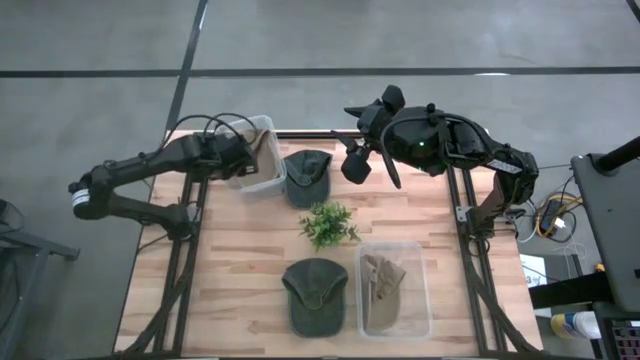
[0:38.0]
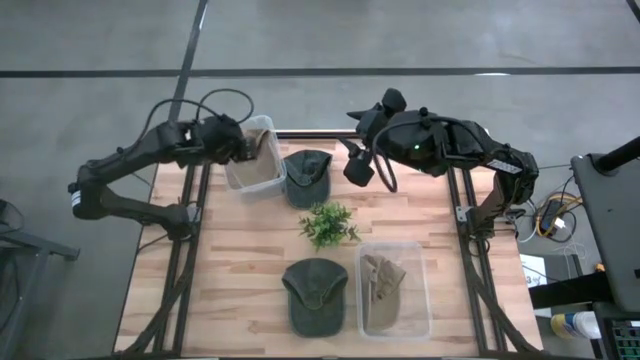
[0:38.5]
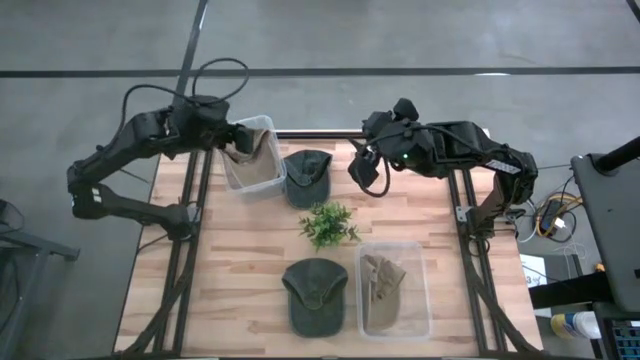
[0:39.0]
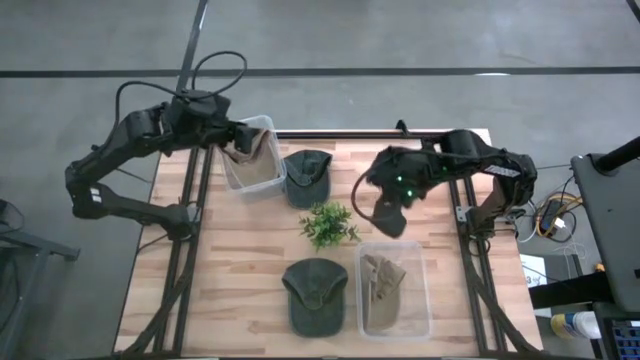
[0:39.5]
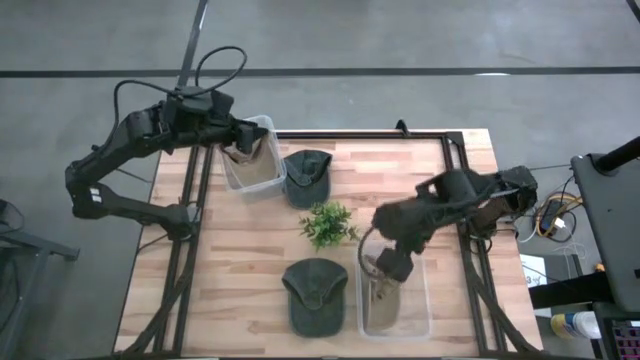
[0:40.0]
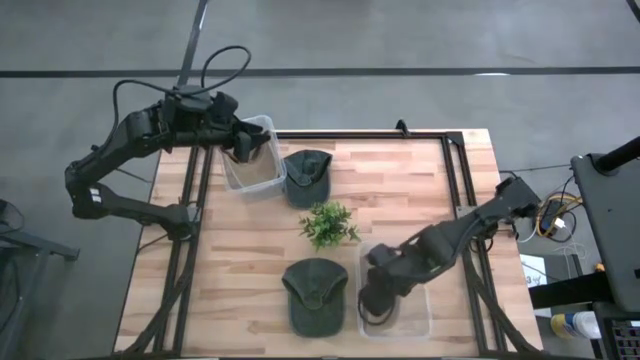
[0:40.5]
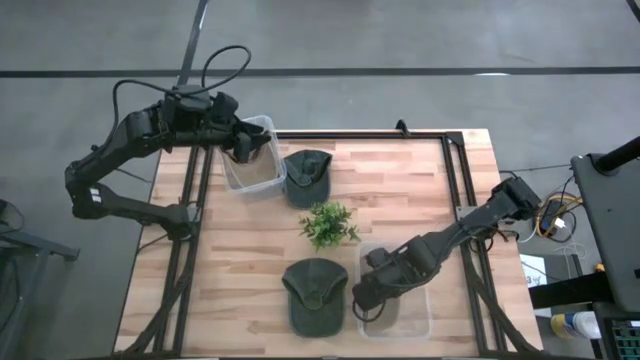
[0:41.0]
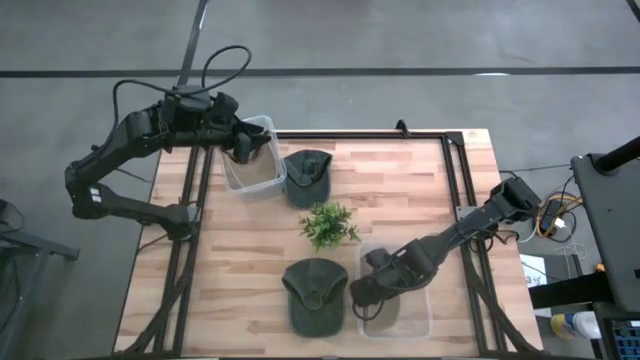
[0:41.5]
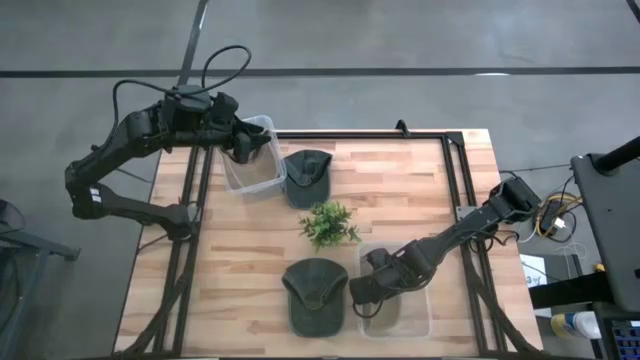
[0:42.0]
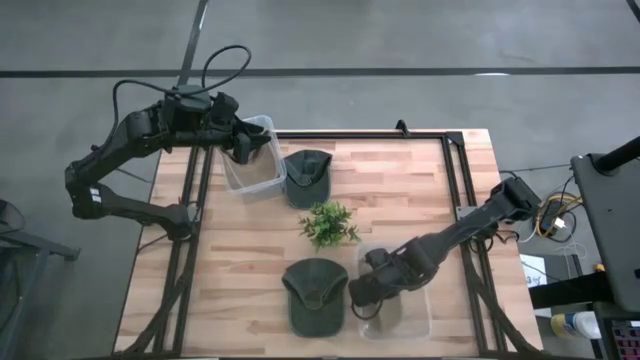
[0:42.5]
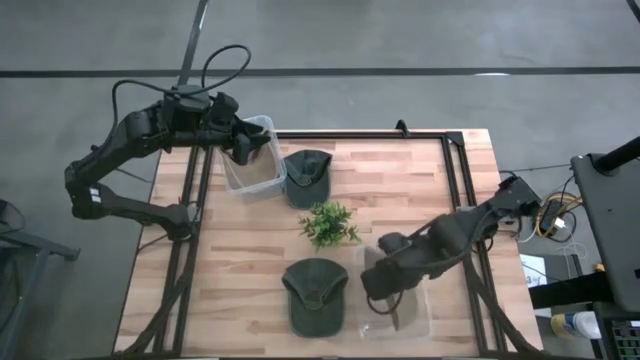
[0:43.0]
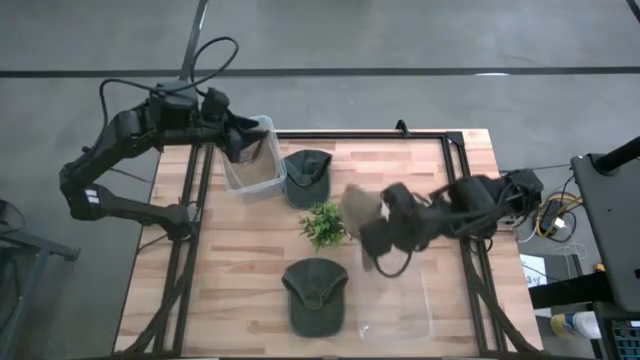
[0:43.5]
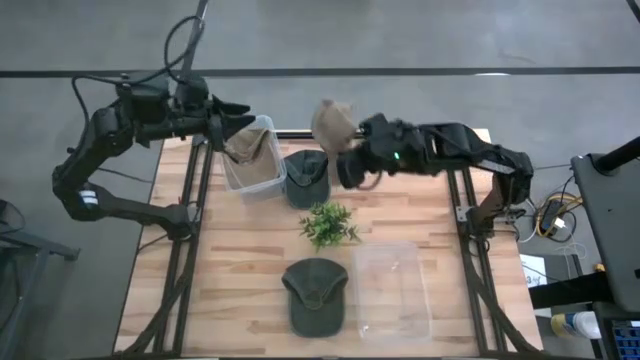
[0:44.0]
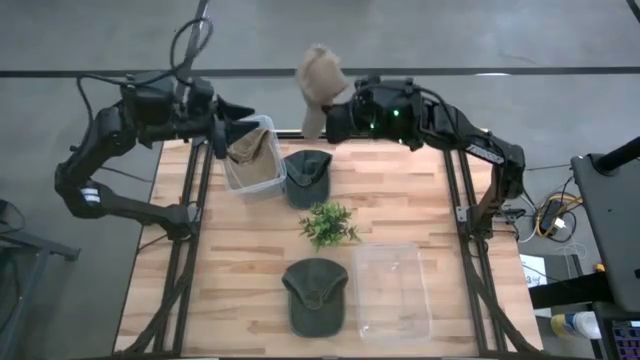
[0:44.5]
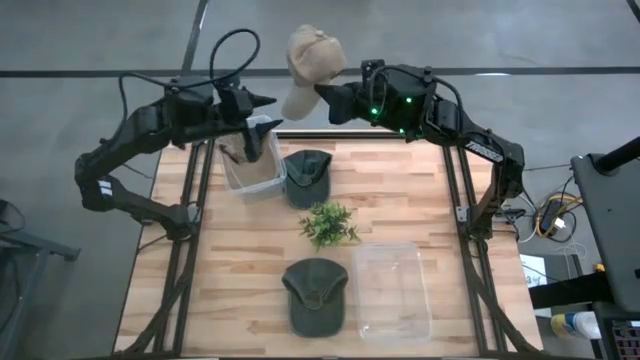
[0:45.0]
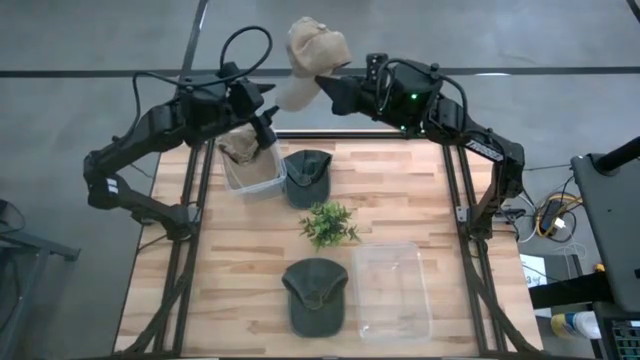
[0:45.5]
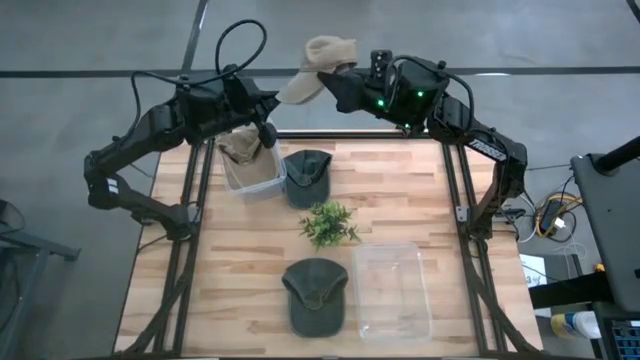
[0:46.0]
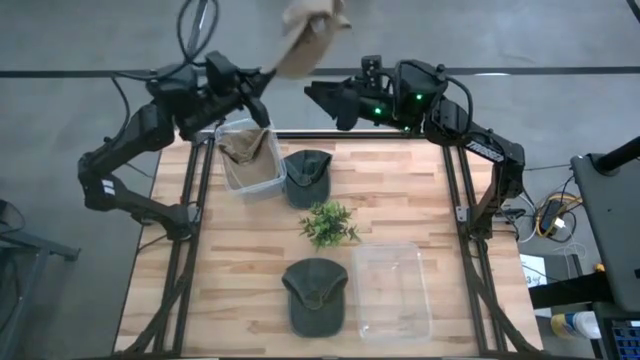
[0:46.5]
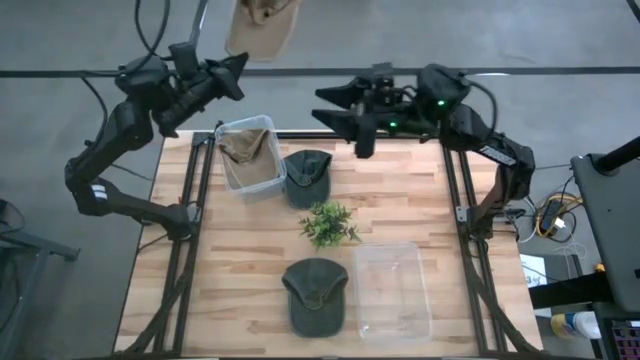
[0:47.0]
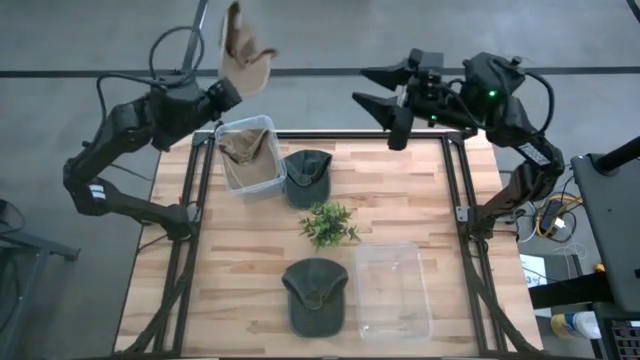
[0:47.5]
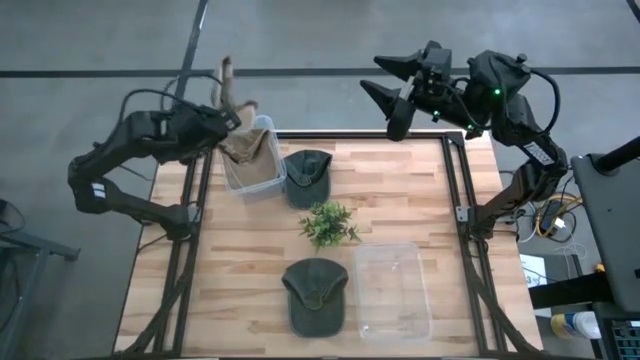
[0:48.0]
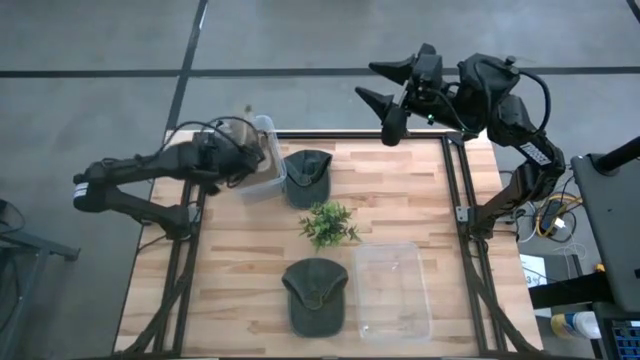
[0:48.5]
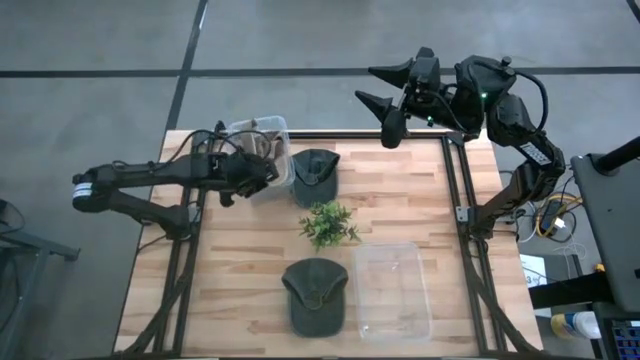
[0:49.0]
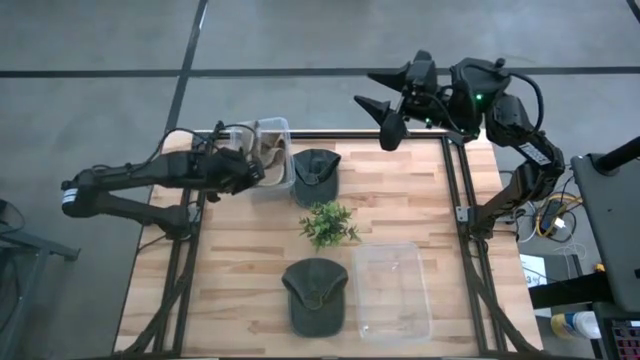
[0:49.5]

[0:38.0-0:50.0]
Task: Pick & Place hat
Put the brown cap from the bottom transparent bin into the top transparent bin

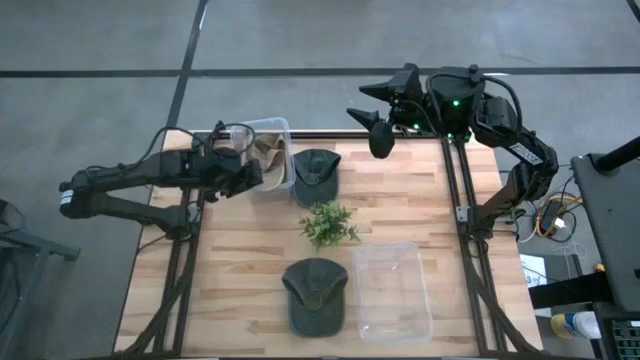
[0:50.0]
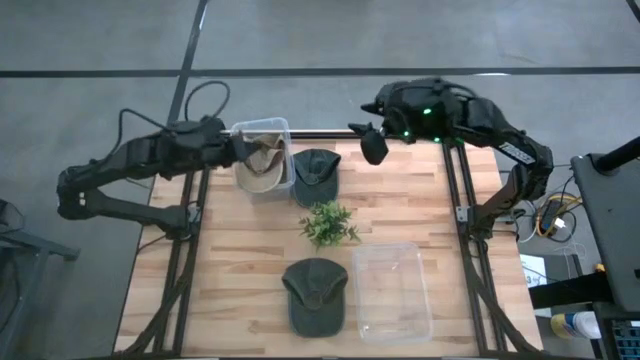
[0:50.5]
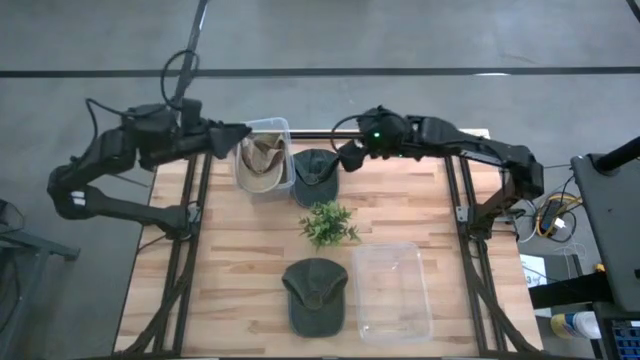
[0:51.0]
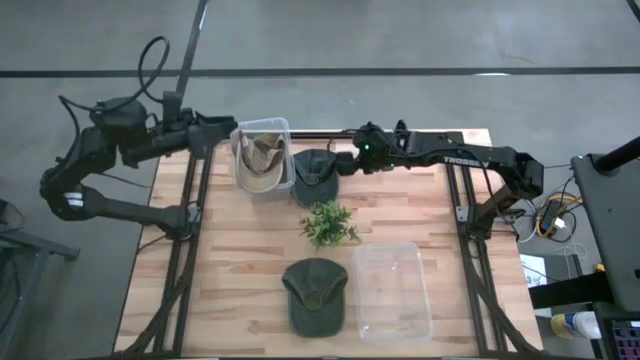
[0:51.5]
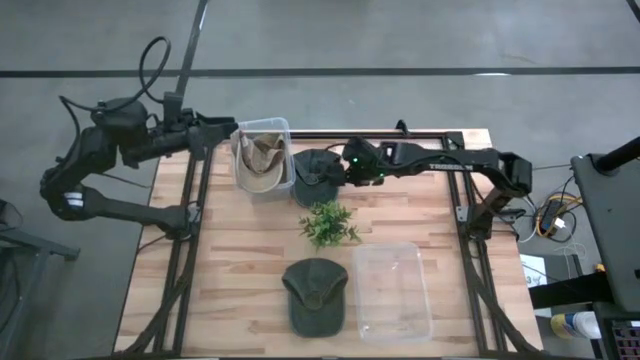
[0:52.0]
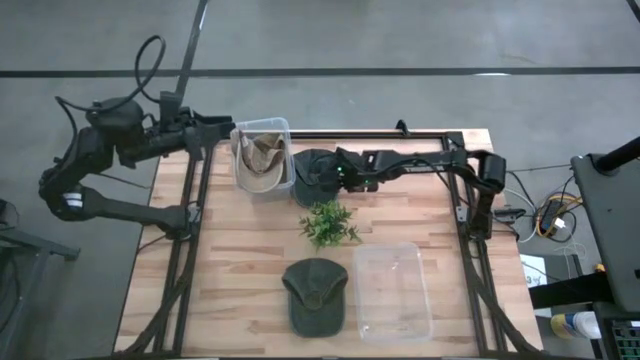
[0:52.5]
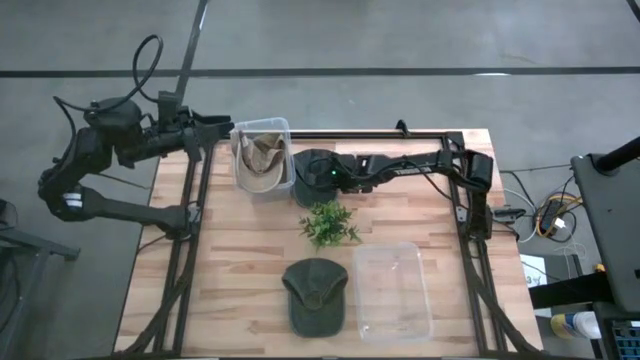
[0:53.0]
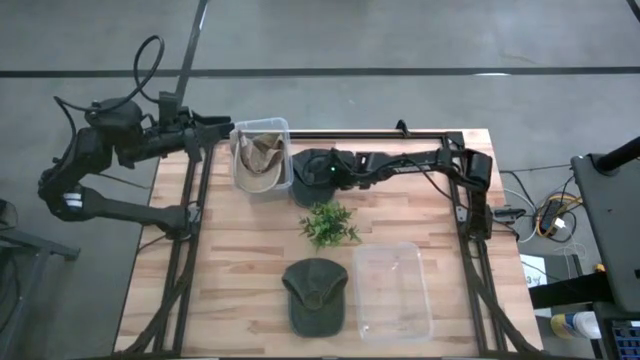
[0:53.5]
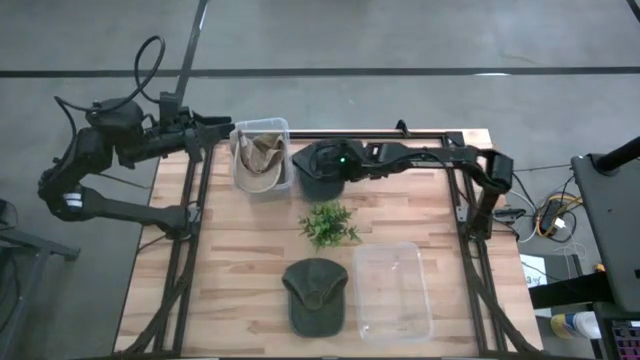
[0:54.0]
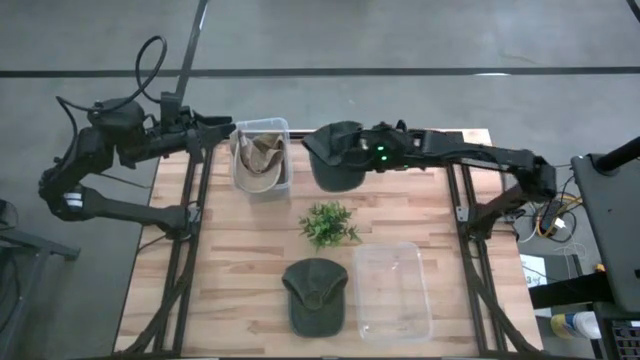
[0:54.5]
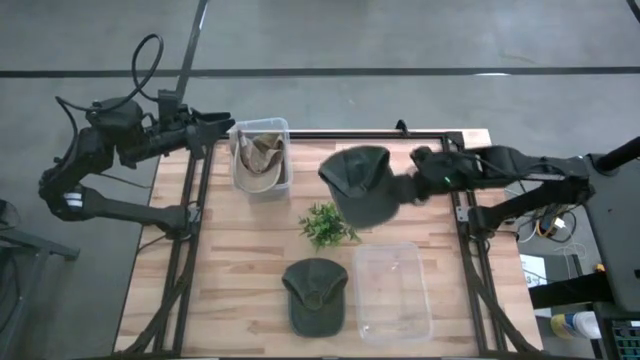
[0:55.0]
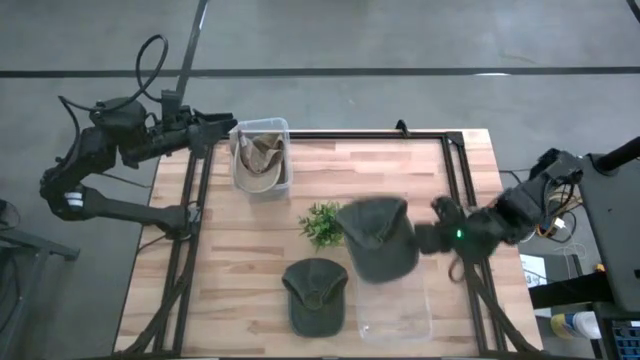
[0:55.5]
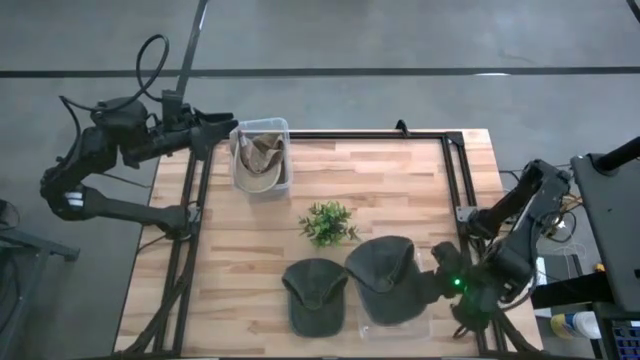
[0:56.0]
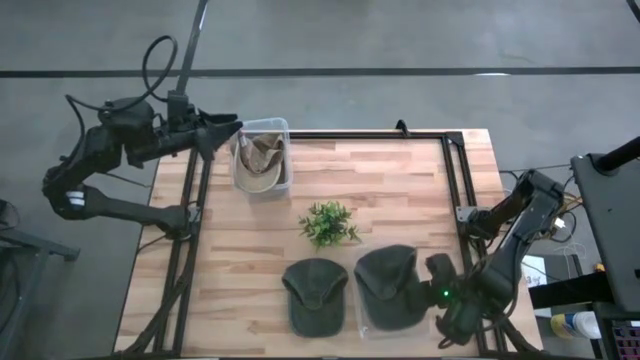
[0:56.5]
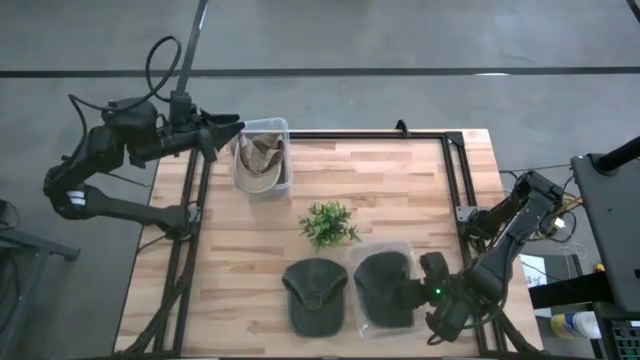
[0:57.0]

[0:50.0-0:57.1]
Put the top green cap into the bottom transparent bin

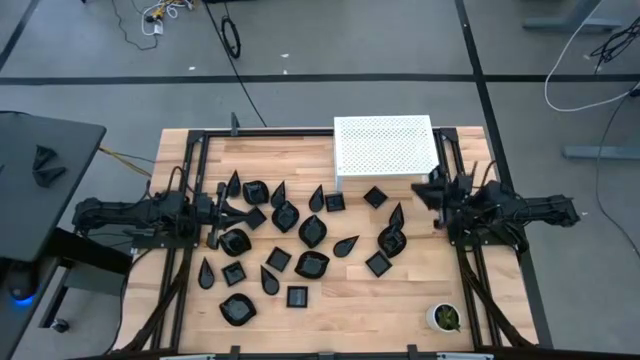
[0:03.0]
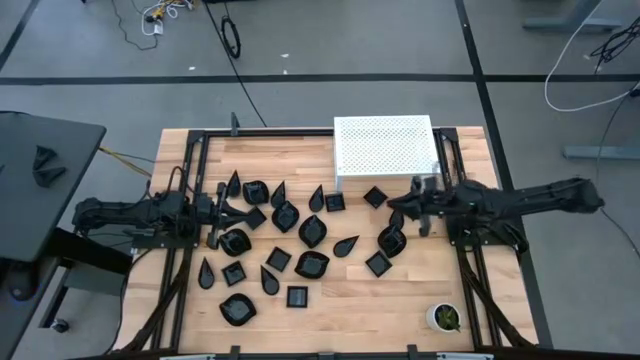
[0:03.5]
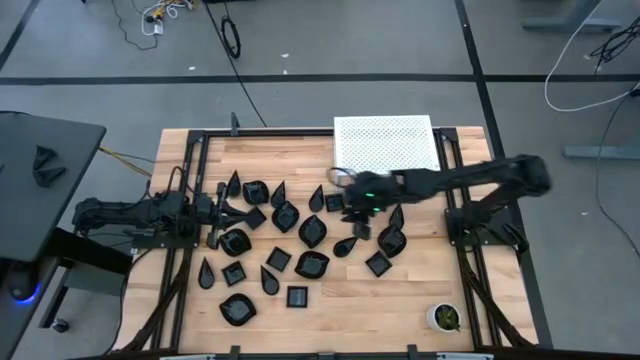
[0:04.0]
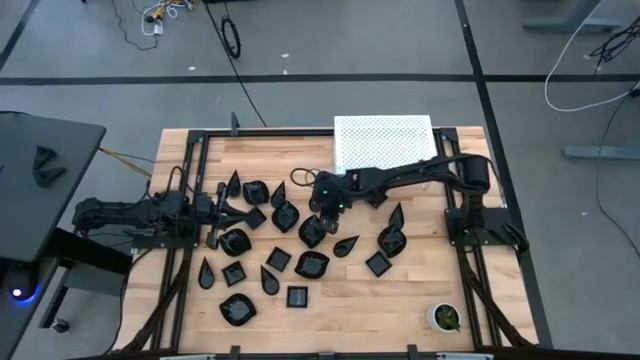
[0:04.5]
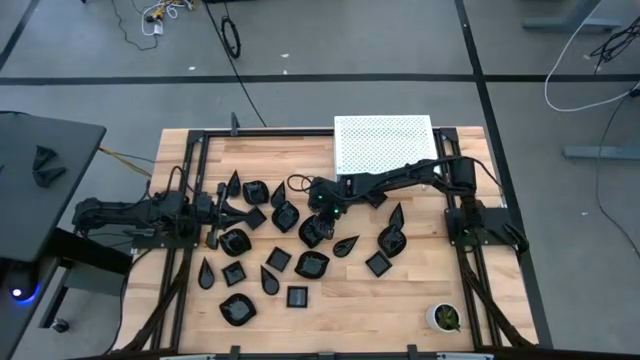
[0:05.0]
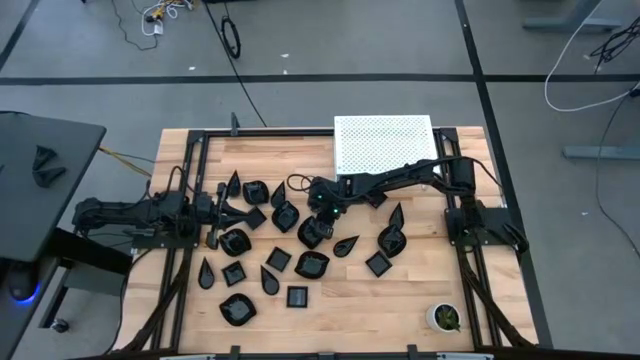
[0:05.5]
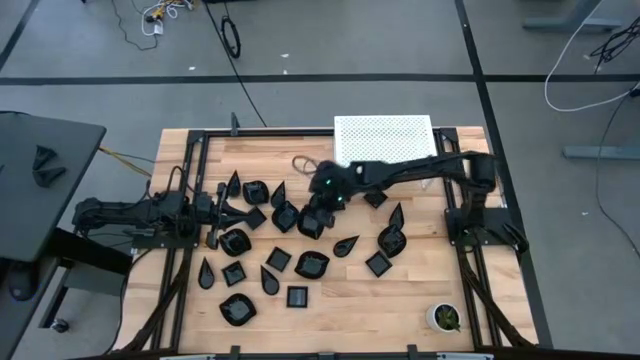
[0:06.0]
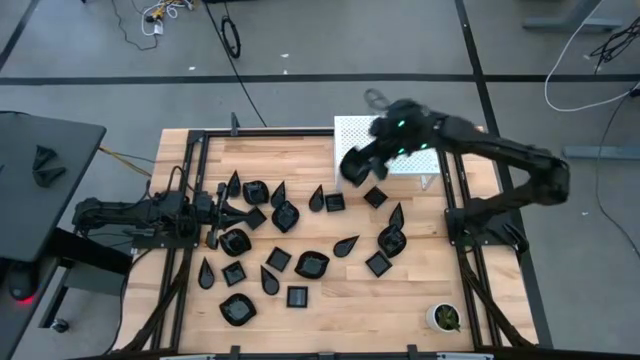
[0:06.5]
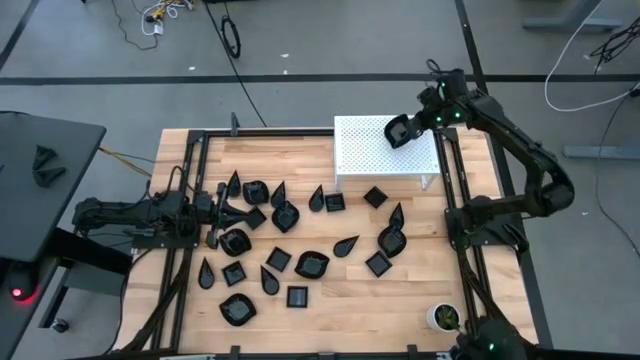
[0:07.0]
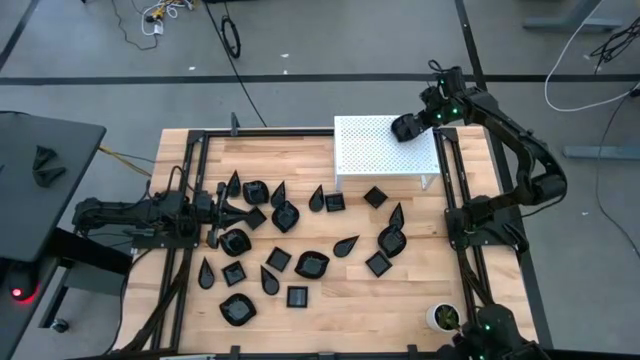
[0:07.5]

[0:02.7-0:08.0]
Task: Pick & Place Mini shaped plates
Put the black leaf shaped plate on the shelf
